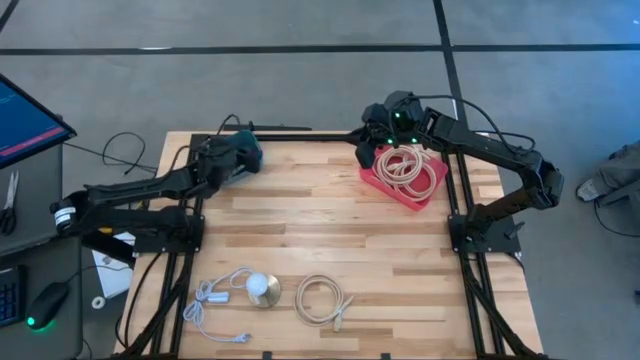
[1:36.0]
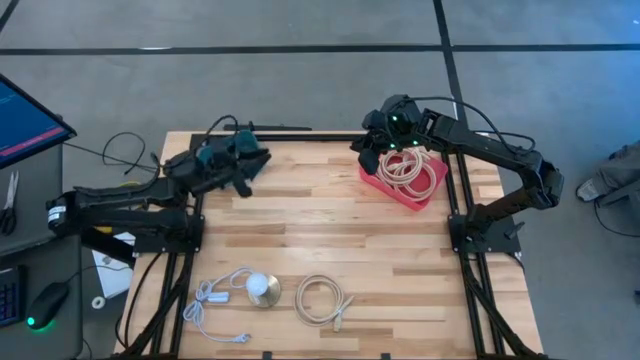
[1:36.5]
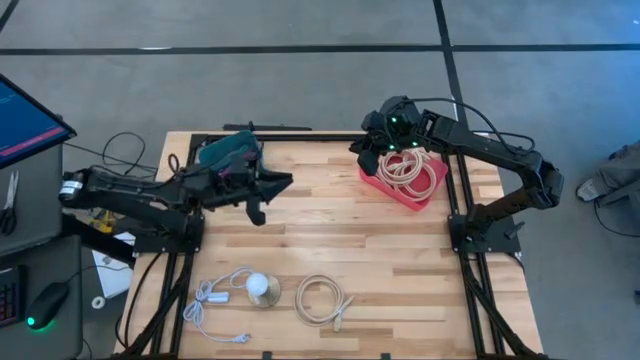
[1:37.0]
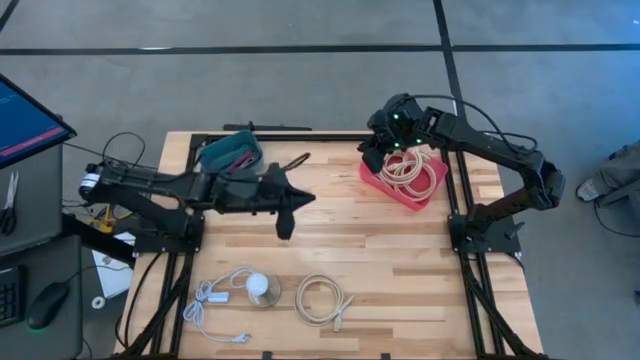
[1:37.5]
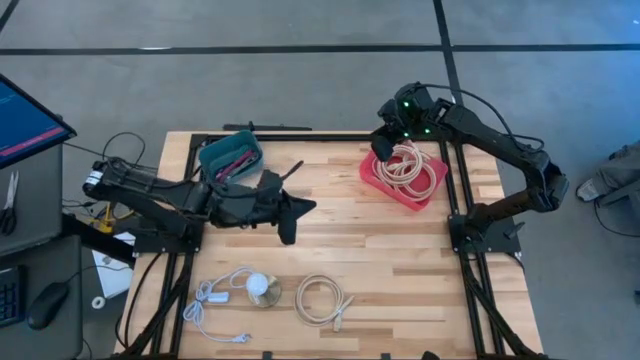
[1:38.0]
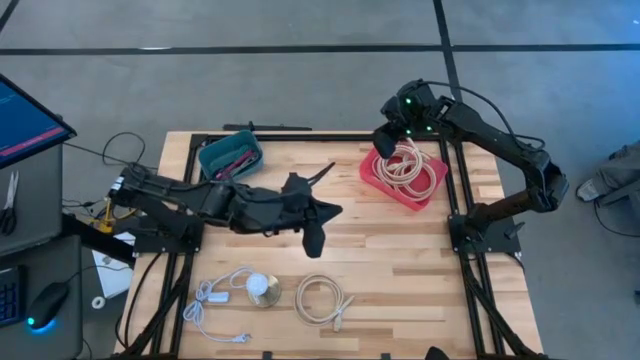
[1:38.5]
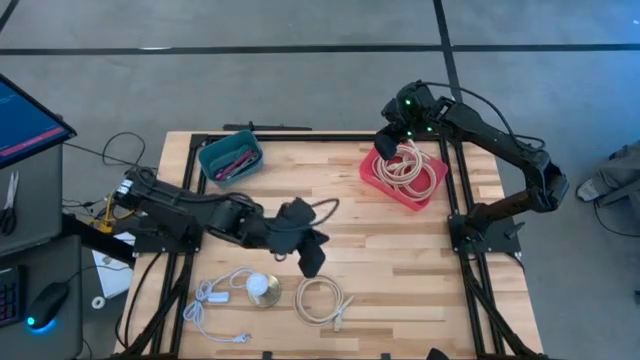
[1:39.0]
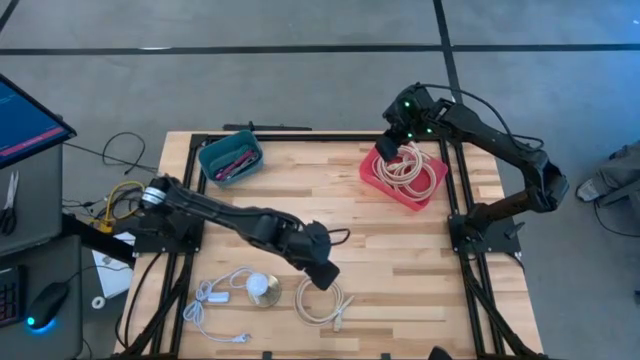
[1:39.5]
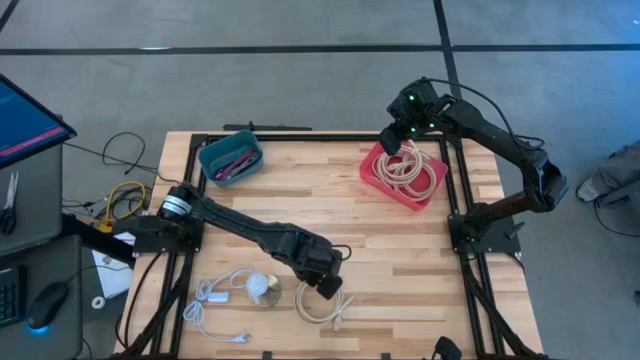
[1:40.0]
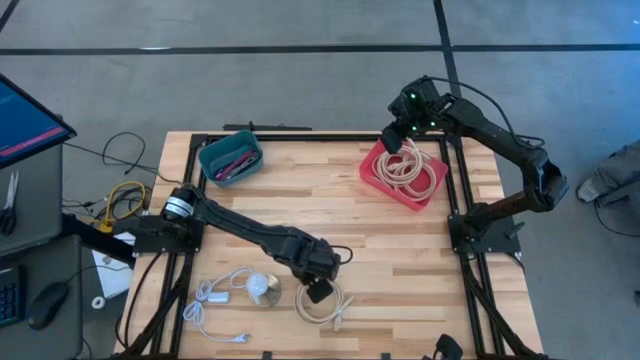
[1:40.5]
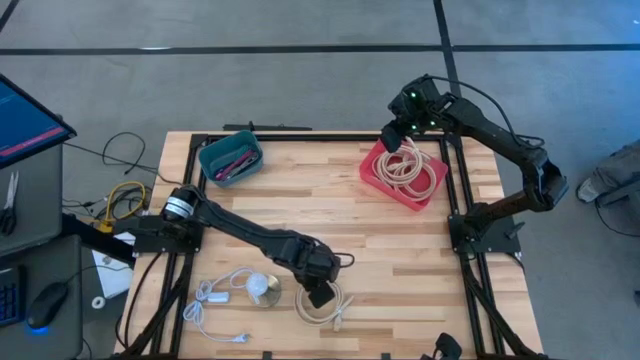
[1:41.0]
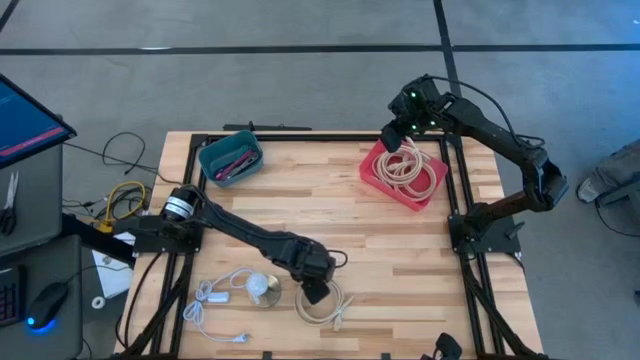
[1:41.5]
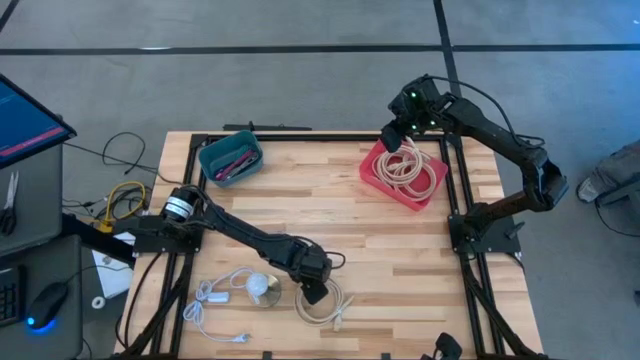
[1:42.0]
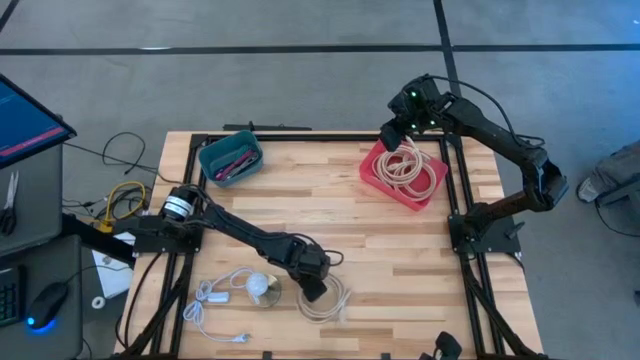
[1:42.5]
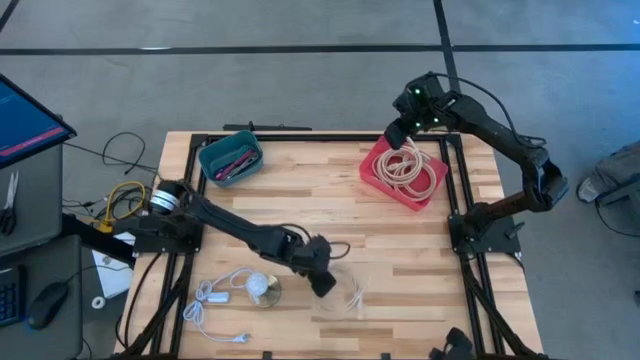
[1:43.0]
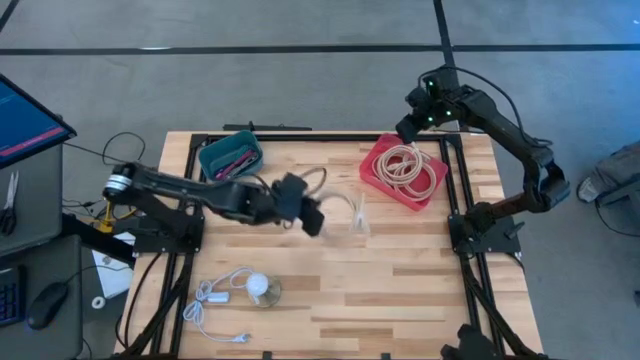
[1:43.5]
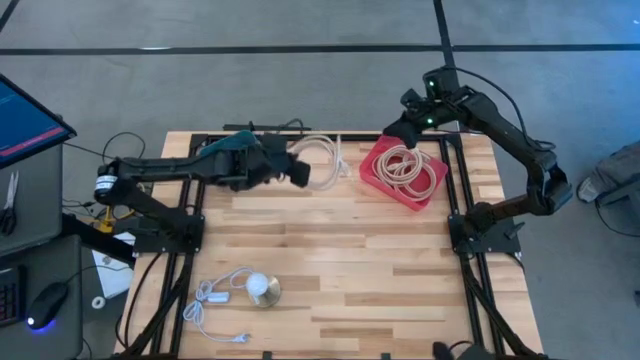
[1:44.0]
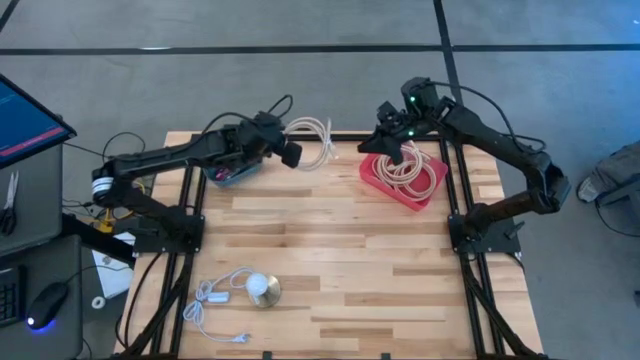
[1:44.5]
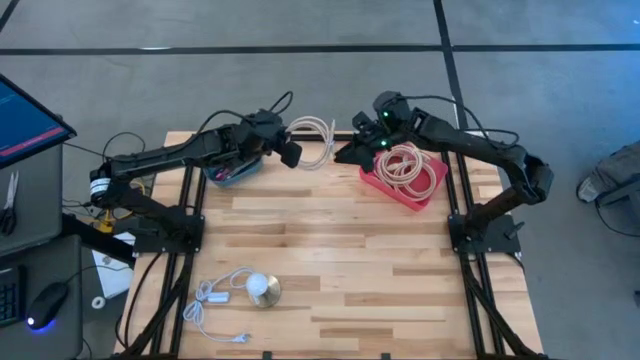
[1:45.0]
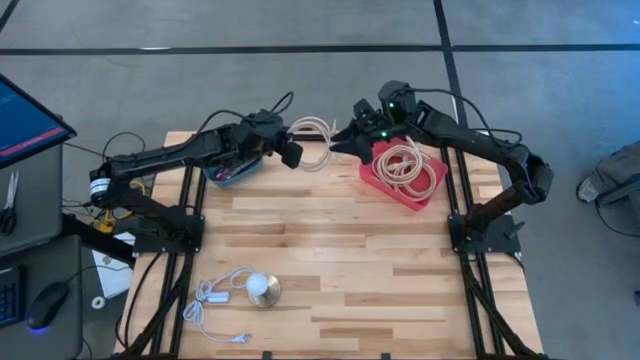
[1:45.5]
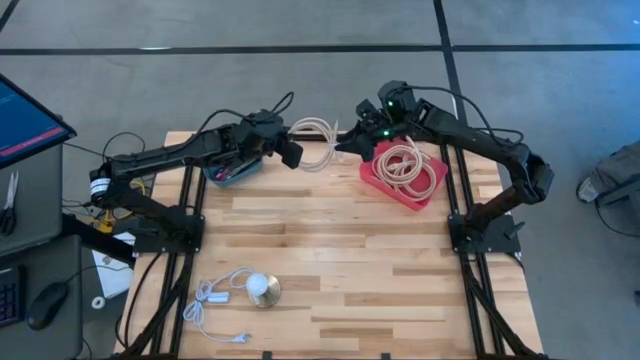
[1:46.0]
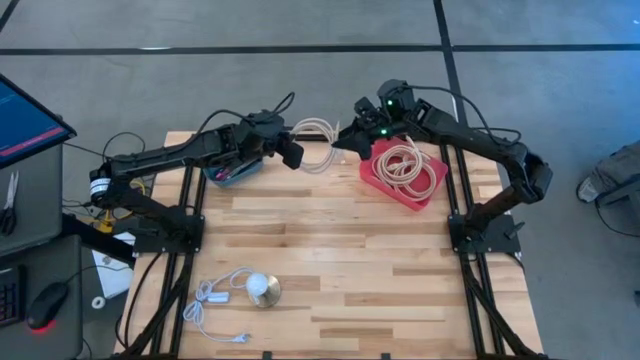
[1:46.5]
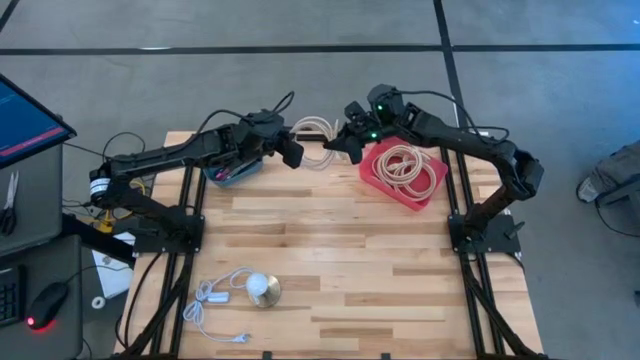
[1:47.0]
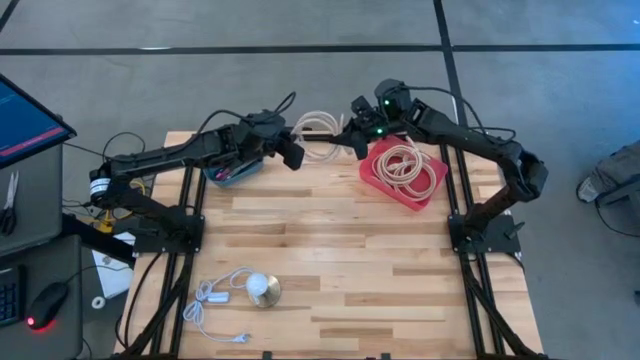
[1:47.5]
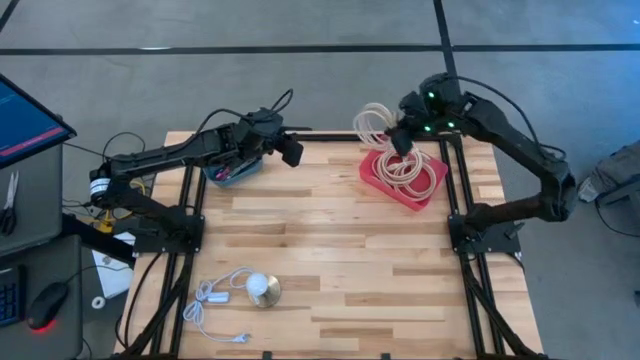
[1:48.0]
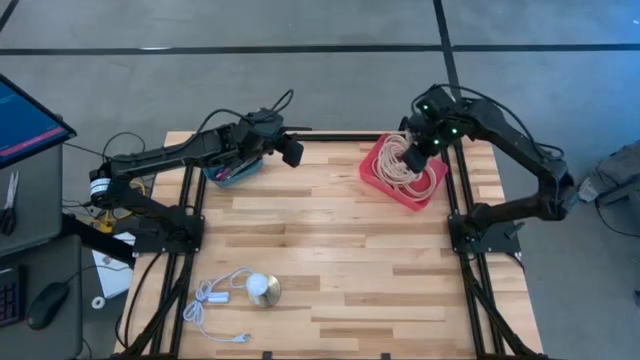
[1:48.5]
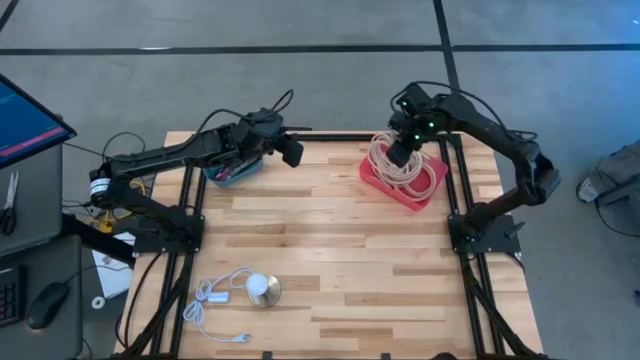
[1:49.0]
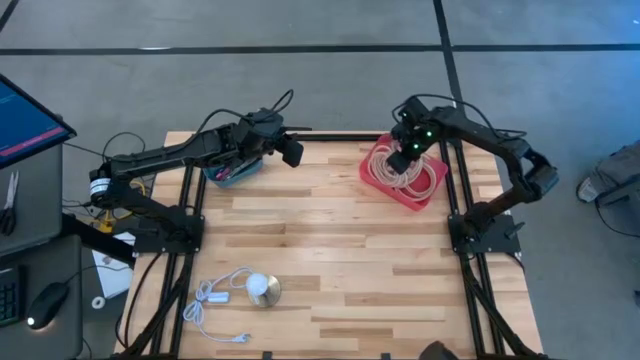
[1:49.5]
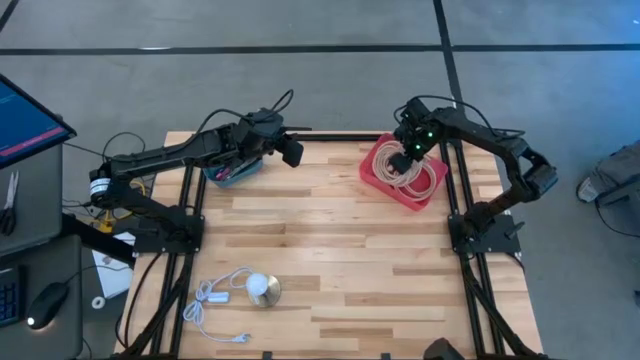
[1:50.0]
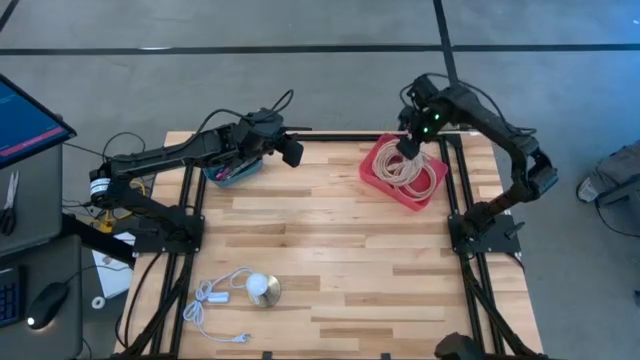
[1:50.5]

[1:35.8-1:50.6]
Task: Pick & Place USB Port
Put the white charger cable into pink bin

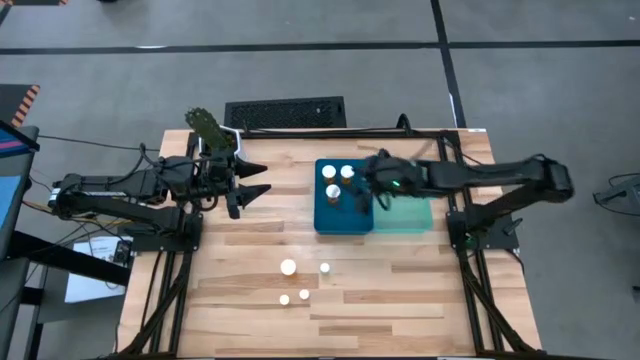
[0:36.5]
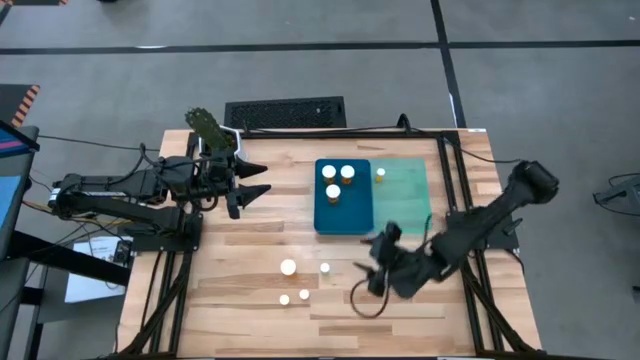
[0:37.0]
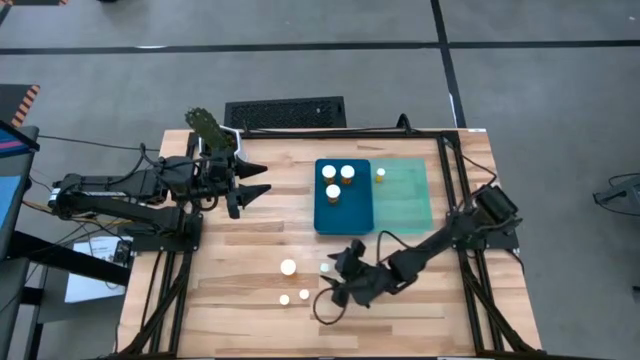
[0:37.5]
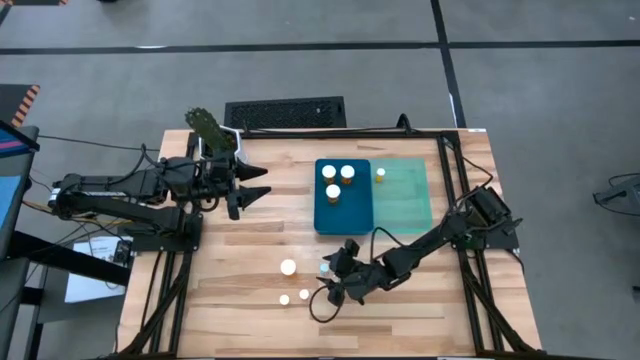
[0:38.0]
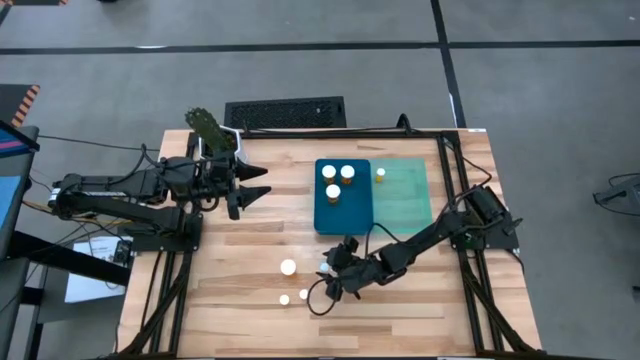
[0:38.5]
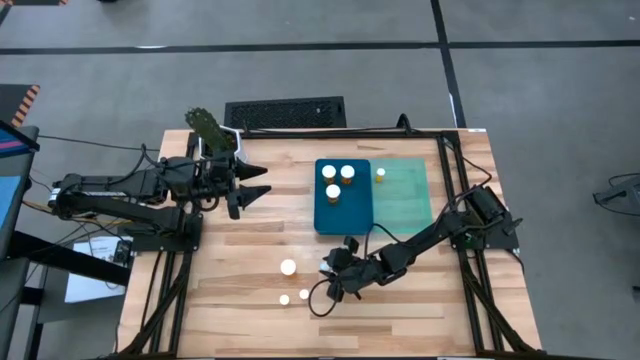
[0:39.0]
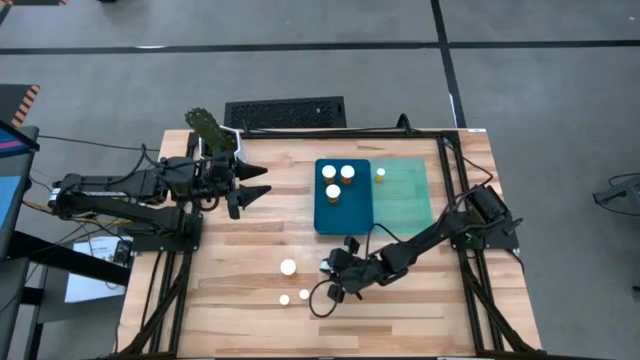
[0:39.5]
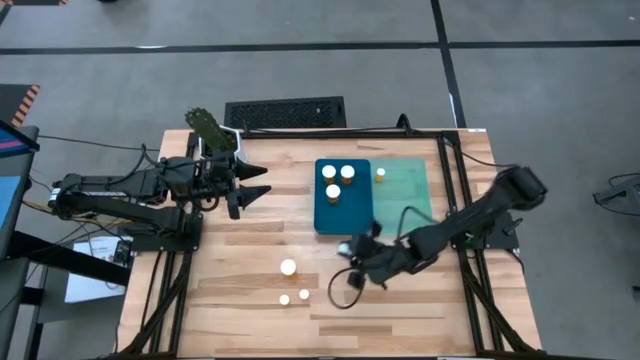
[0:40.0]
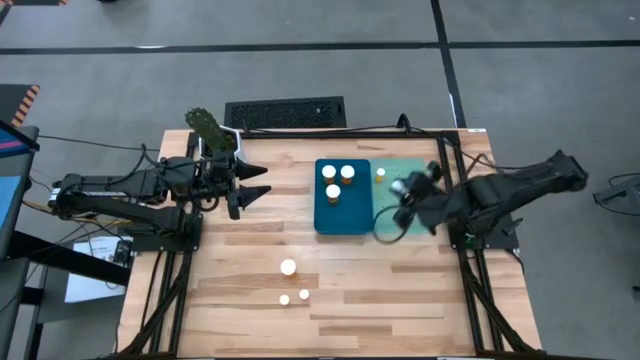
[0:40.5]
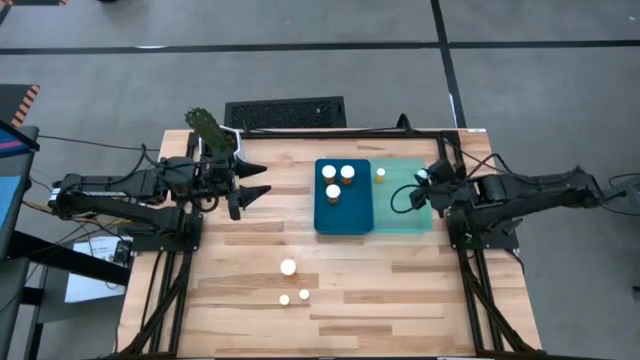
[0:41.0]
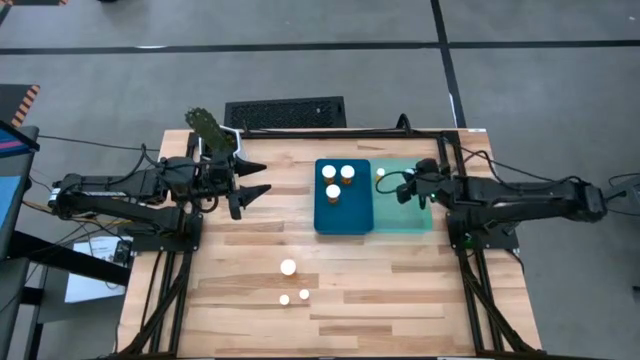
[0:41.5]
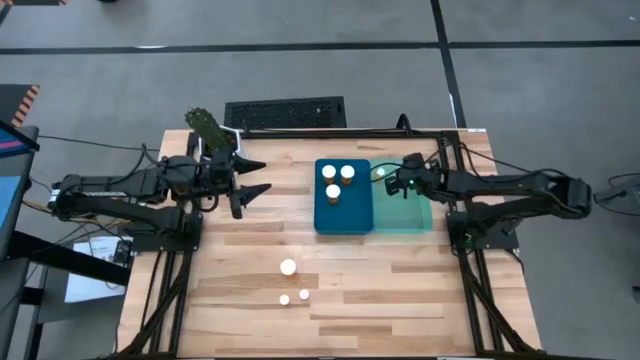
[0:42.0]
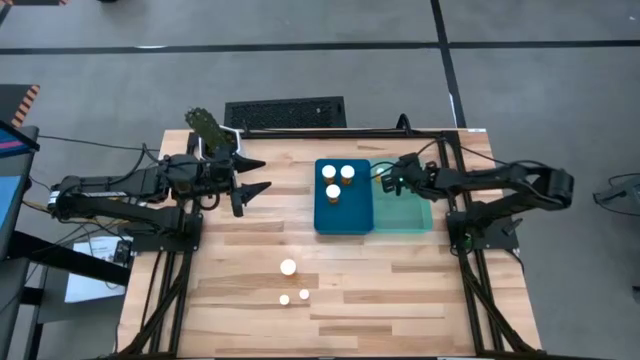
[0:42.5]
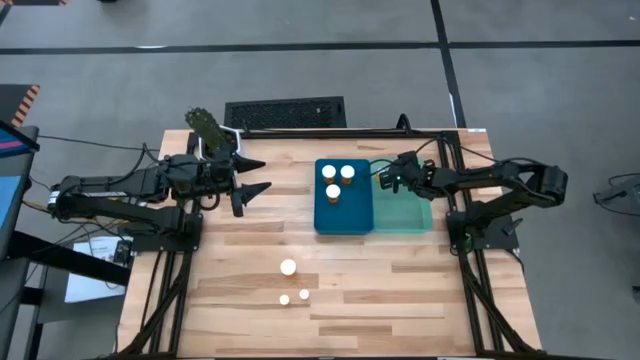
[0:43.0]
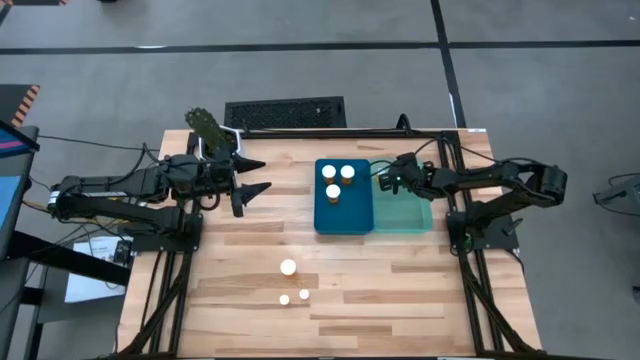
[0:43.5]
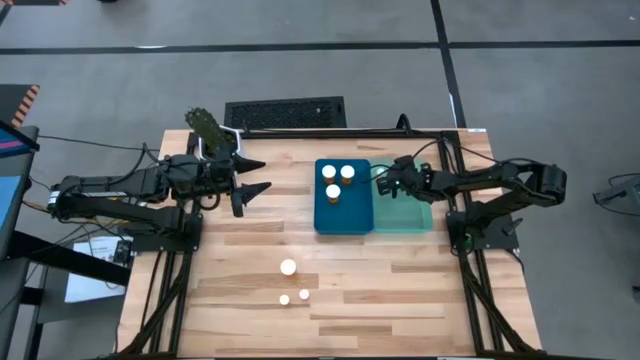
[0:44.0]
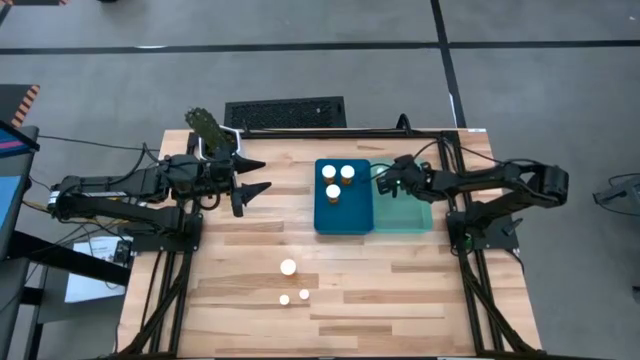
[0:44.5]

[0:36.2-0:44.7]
Task: Pick and place medicine bottles into bin by pill shape (circle, oval)
Put the small green pill bottle into the green bin
